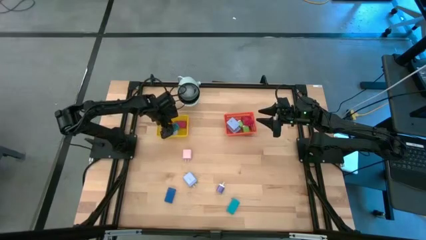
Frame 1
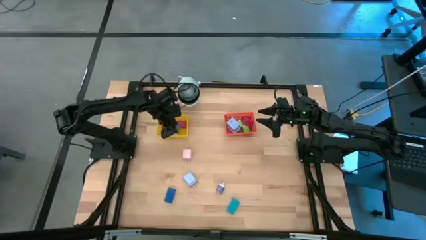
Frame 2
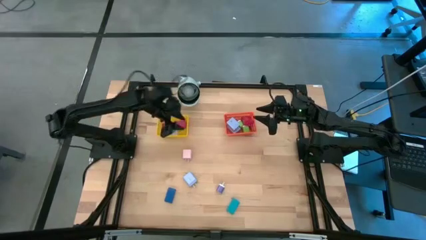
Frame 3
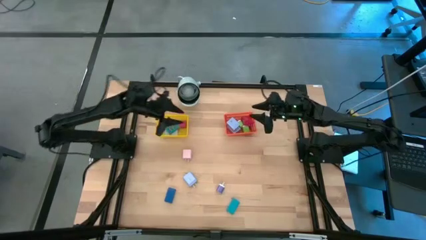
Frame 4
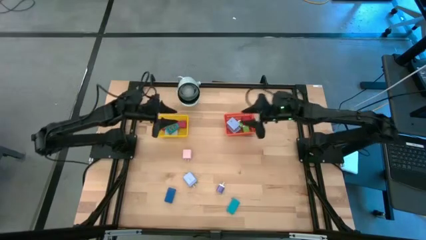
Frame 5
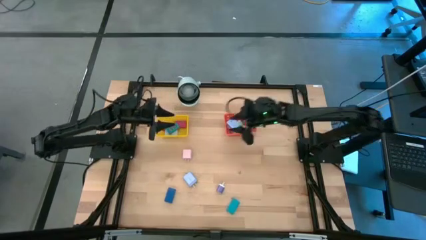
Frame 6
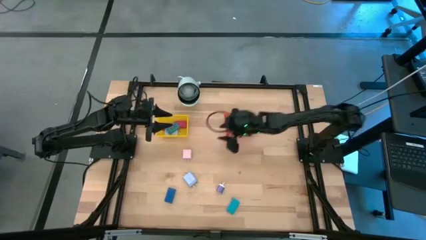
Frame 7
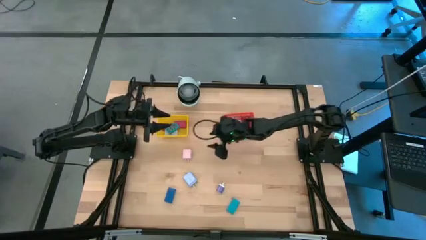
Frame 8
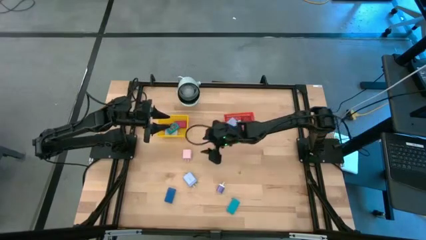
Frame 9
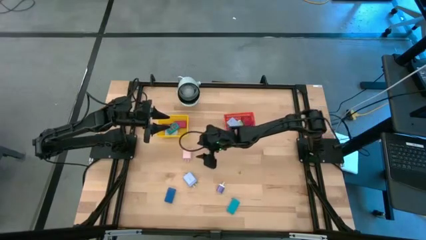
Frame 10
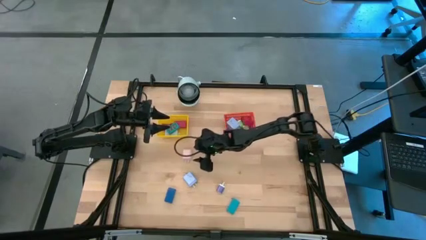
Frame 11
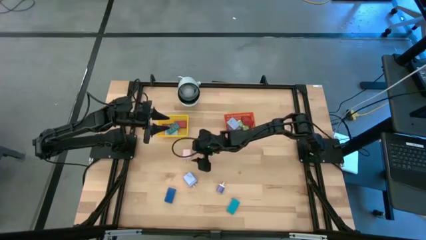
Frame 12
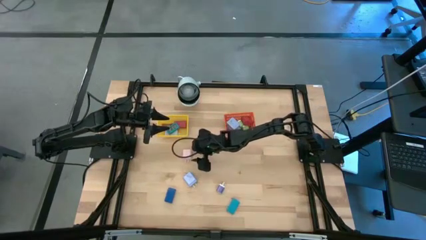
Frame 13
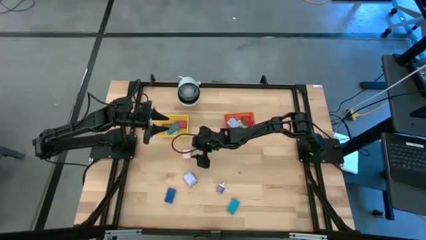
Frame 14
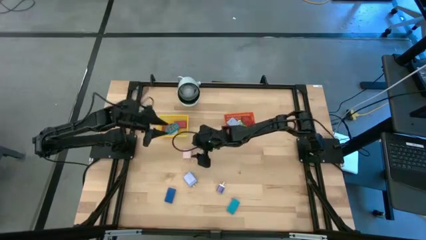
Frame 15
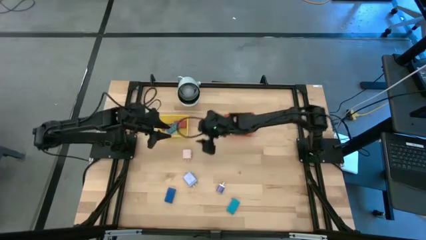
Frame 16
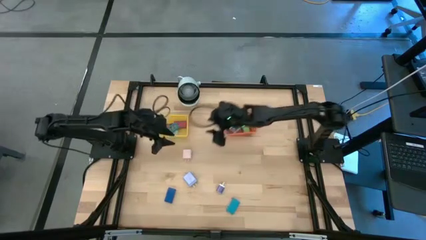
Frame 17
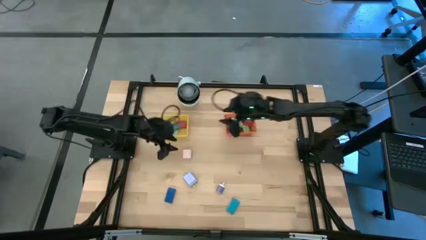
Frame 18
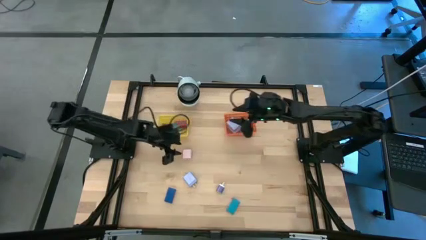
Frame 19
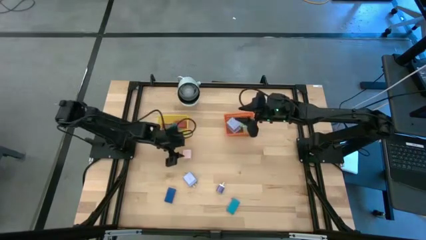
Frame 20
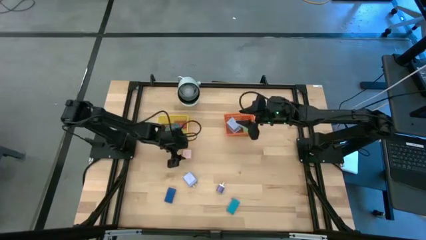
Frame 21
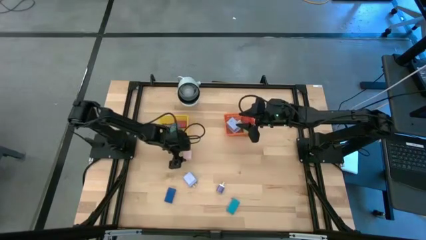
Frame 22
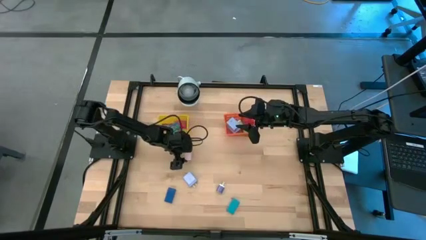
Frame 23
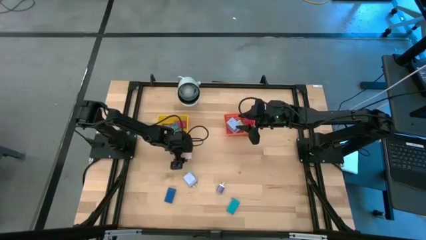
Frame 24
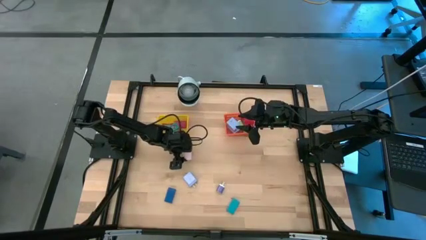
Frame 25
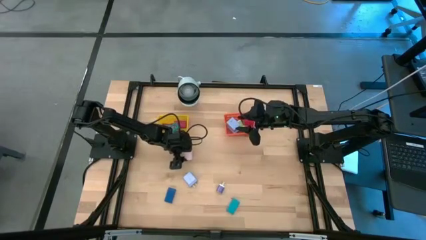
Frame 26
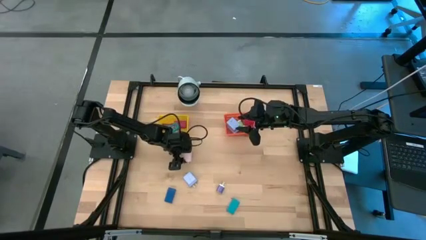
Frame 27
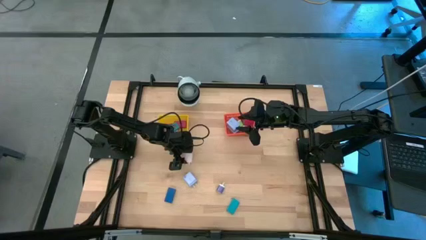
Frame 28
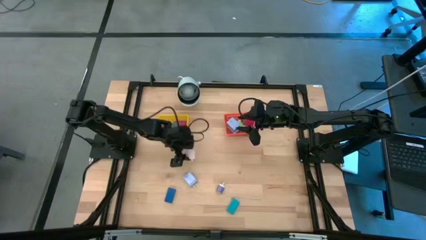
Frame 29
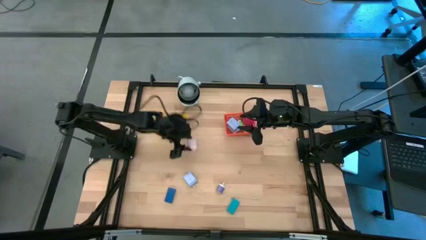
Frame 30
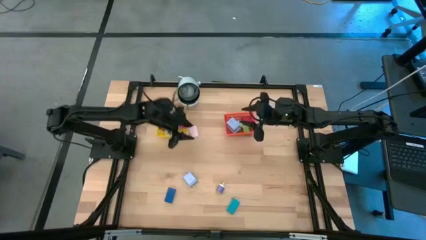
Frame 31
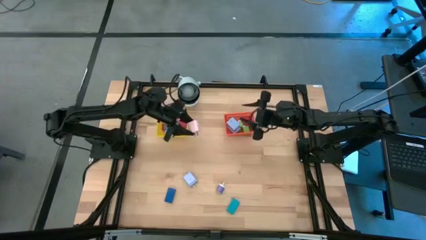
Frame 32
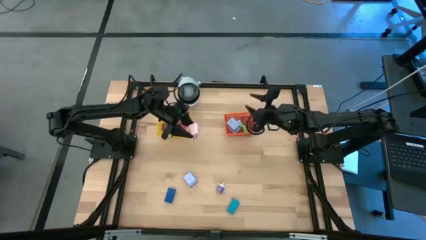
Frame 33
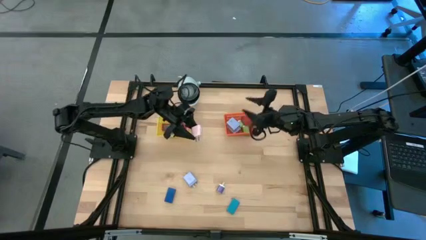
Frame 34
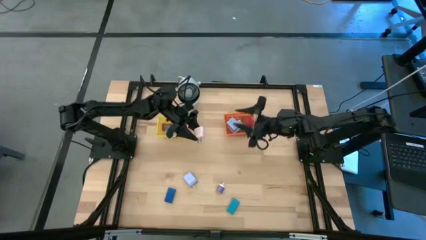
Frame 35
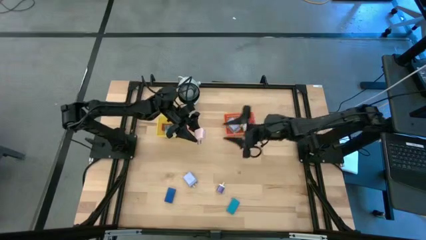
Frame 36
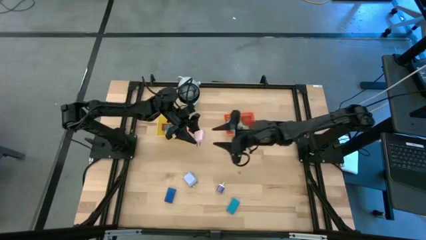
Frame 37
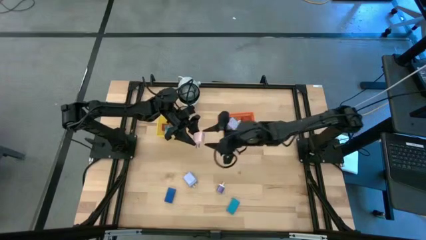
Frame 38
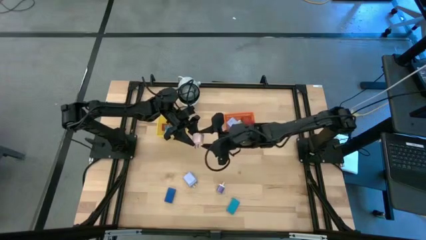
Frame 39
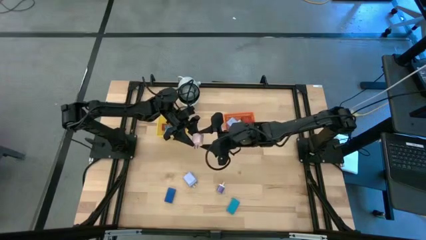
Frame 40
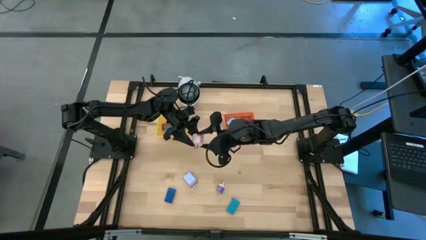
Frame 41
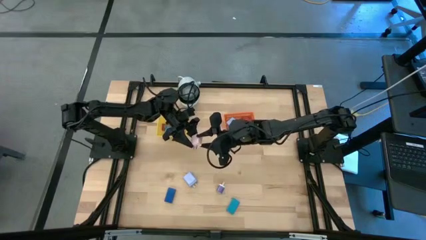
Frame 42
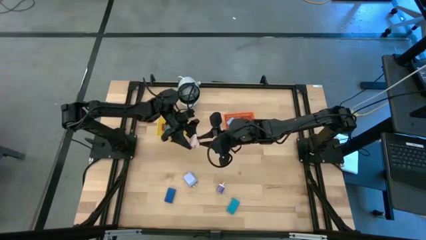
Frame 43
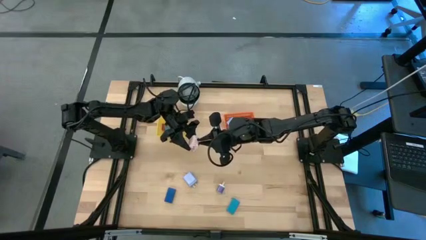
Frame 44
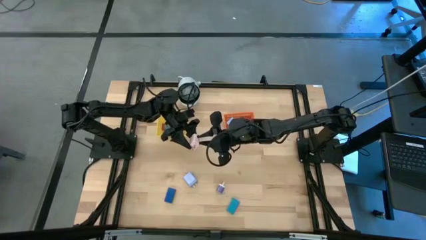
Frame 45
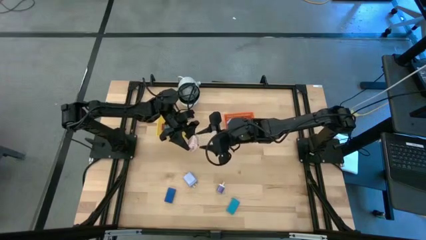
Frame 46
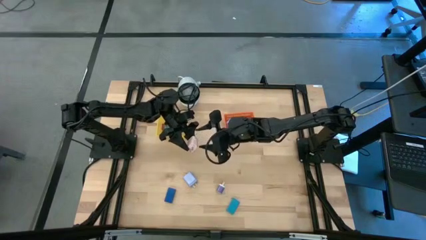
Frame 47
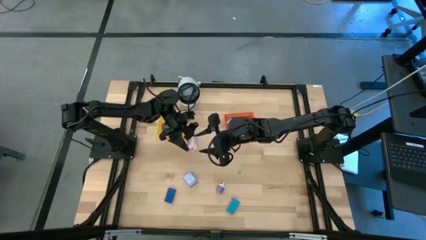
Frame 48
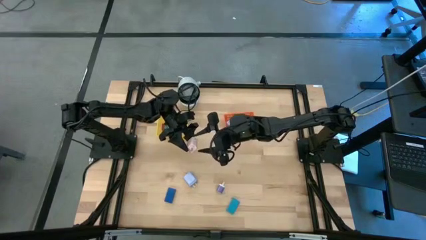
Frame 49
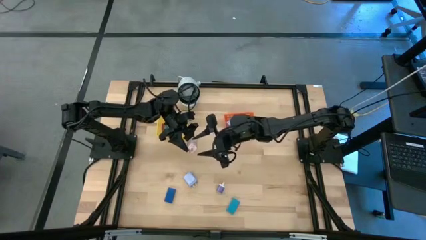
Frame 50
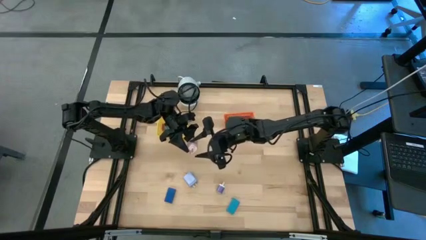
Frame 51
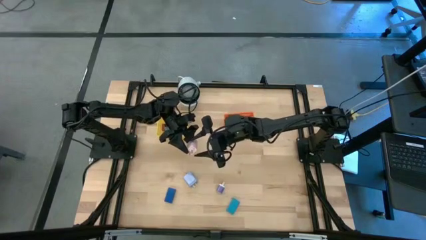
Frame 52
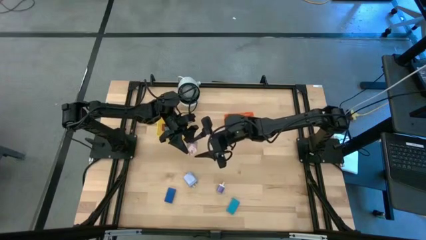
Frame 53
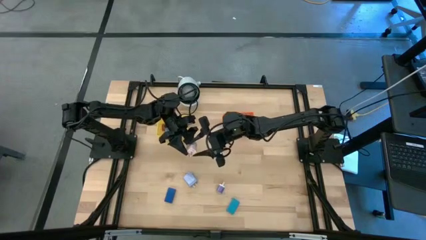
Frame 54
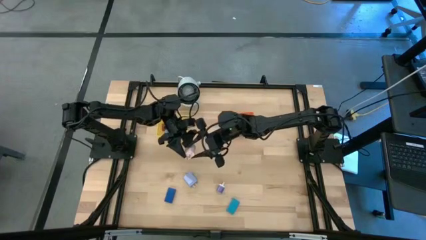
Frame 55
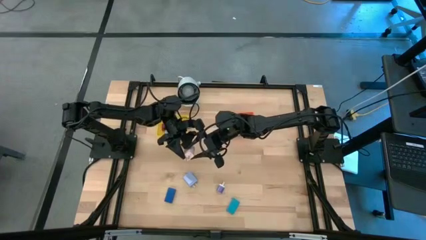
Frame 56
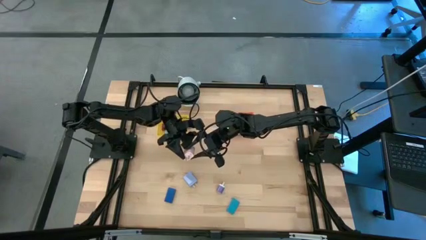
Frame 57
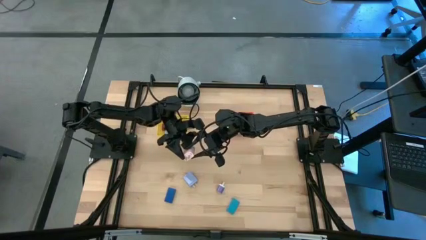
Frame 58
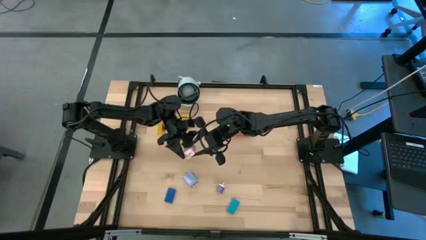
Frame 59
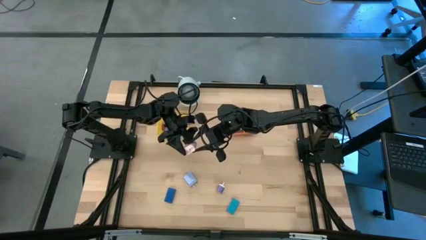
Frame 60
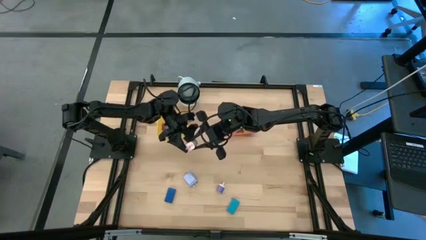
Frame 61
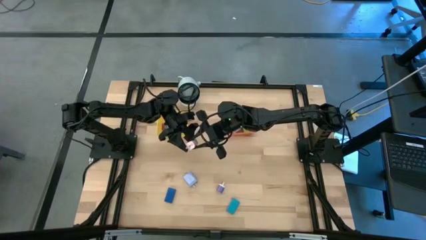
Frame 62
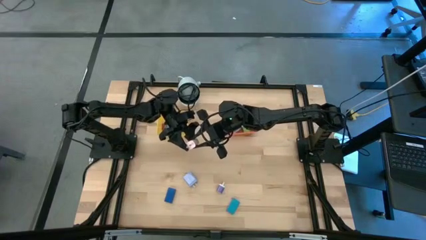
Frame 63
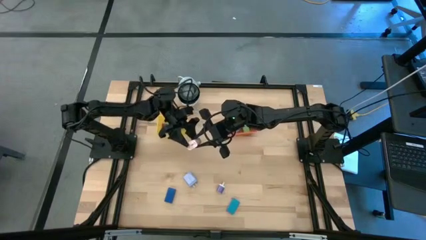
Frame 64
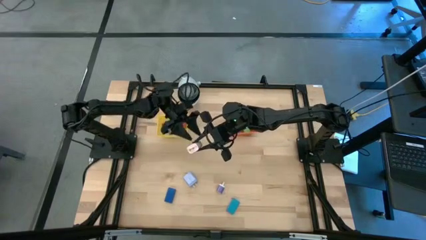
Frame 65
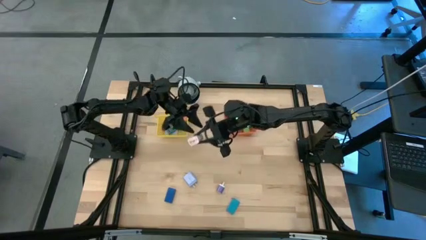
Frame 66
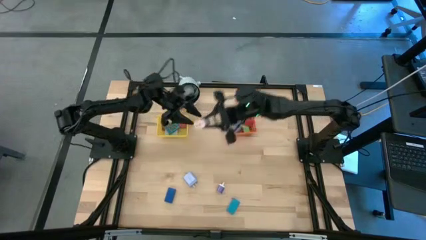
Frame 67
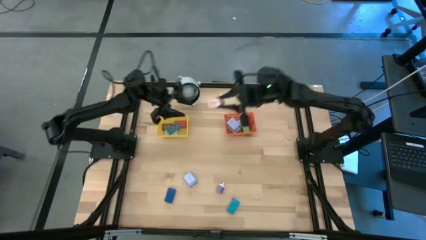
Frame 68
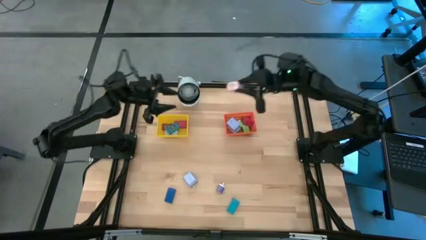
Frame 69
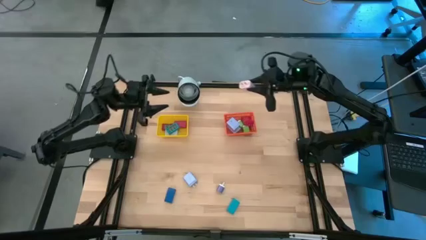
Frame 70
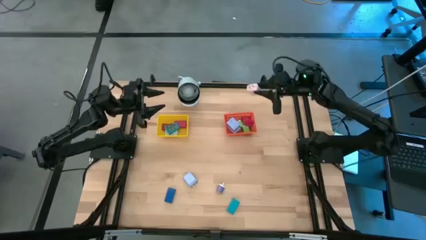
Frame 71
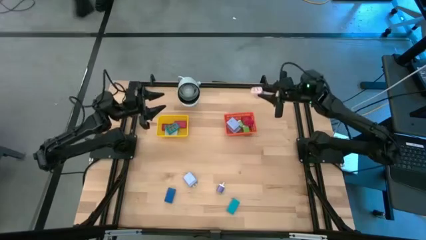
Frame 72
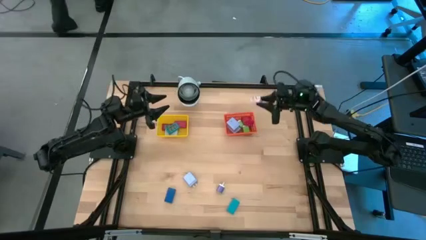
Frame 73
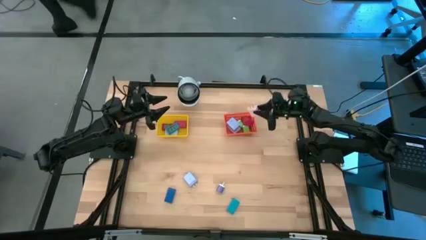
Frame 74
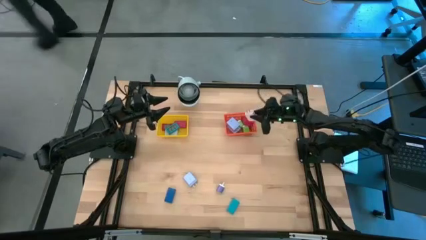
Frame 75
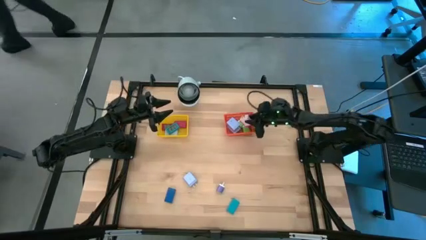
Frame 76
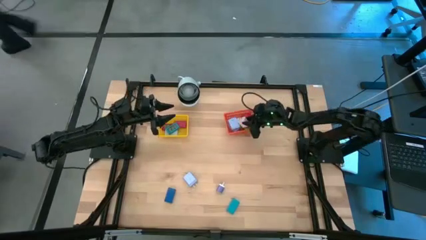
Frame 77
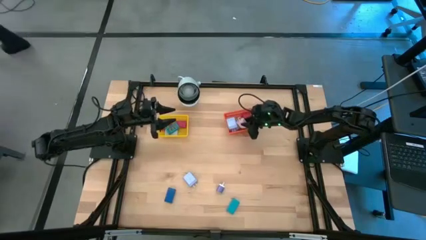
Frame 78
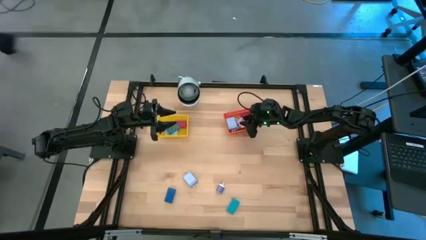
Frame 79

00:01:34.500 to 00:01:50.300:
Task: Pick & Place Office items
Put the light pink charger adapter into the orange bin
